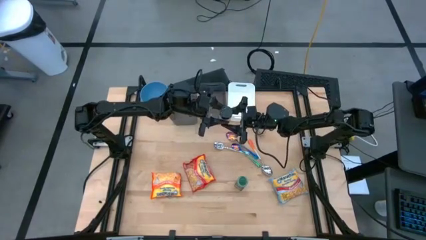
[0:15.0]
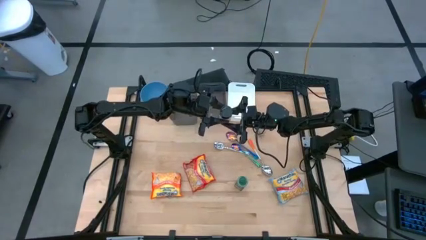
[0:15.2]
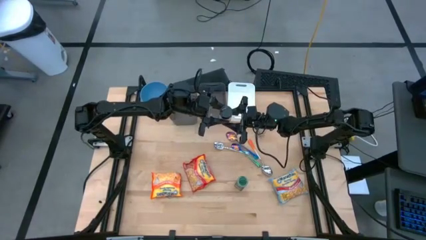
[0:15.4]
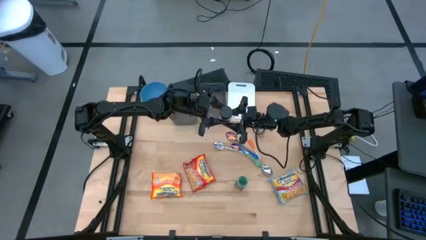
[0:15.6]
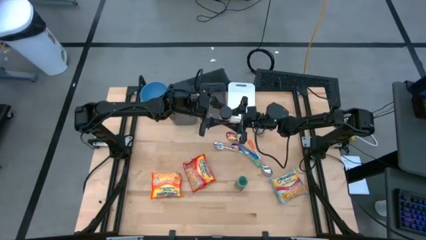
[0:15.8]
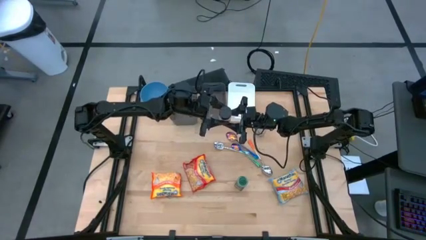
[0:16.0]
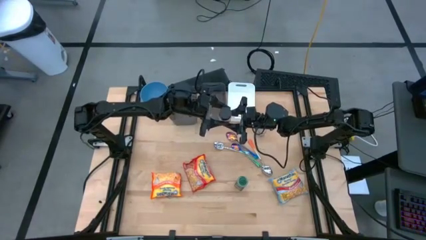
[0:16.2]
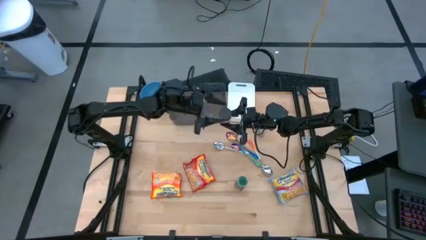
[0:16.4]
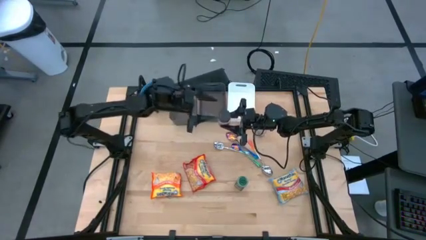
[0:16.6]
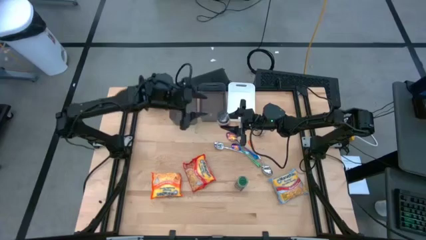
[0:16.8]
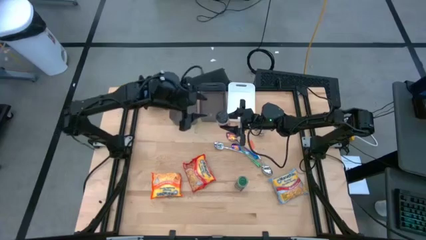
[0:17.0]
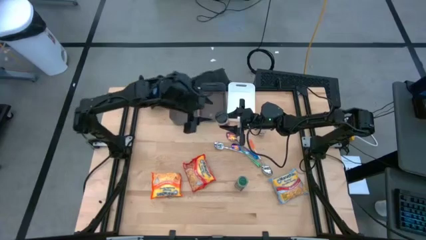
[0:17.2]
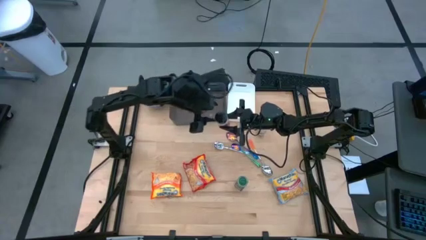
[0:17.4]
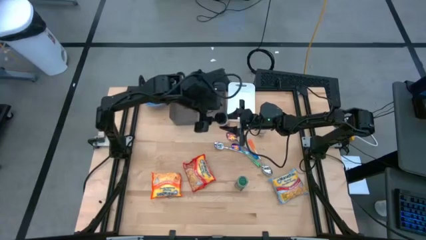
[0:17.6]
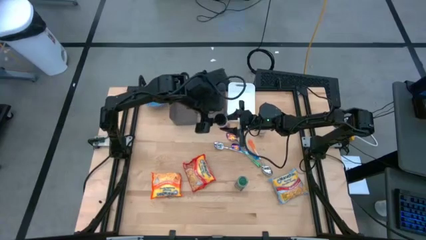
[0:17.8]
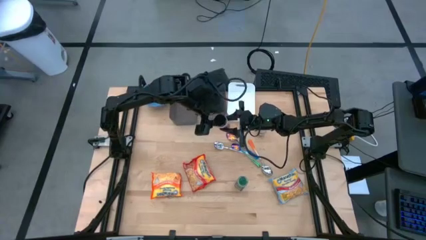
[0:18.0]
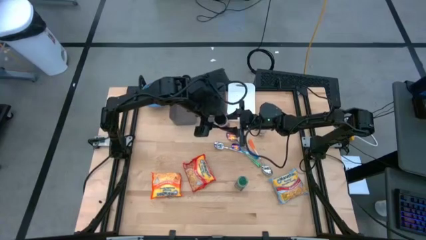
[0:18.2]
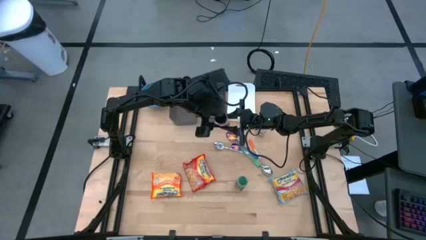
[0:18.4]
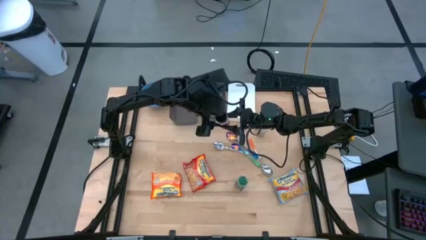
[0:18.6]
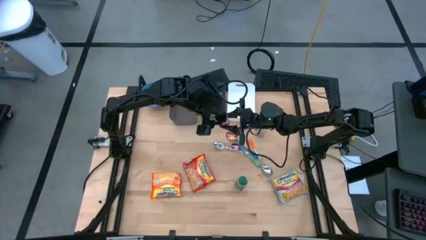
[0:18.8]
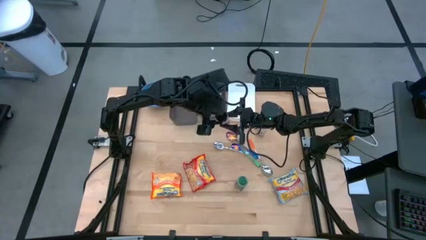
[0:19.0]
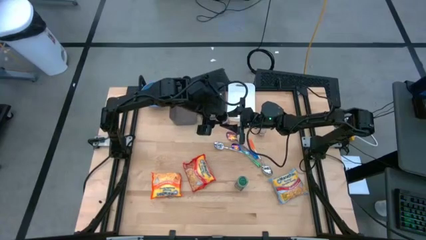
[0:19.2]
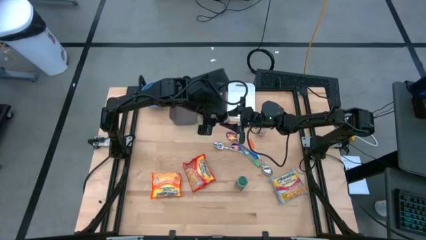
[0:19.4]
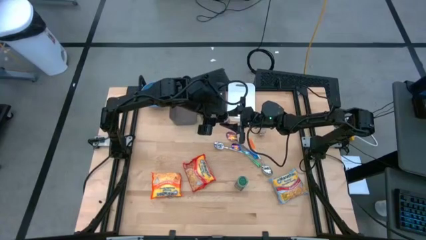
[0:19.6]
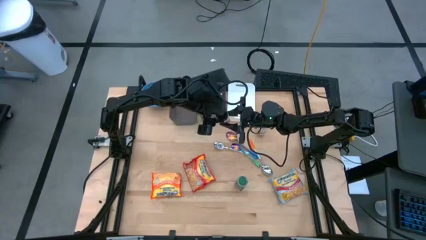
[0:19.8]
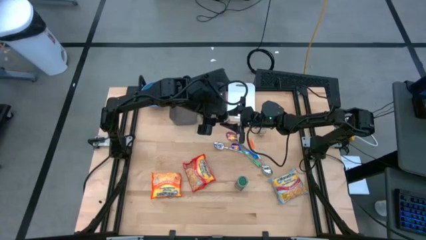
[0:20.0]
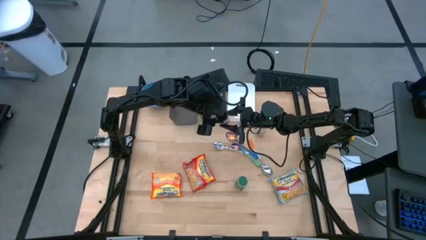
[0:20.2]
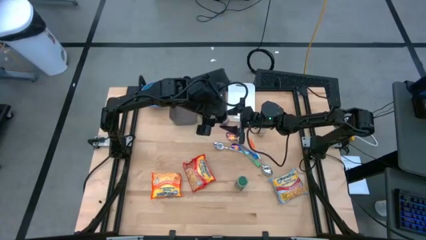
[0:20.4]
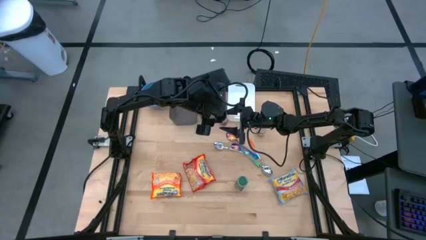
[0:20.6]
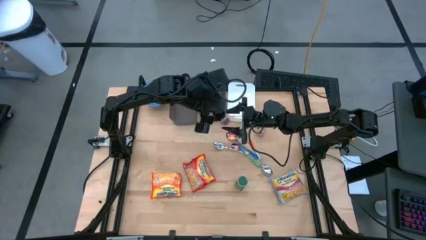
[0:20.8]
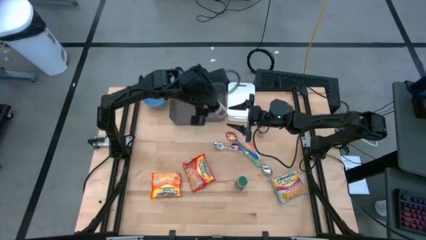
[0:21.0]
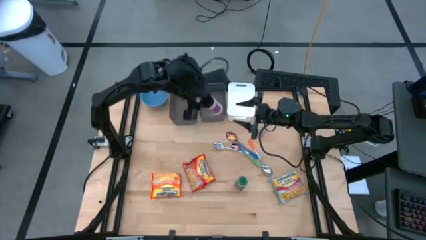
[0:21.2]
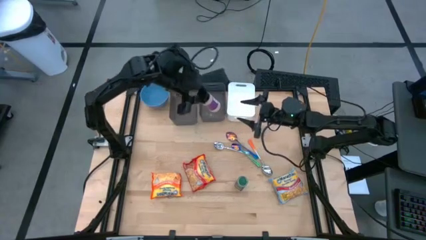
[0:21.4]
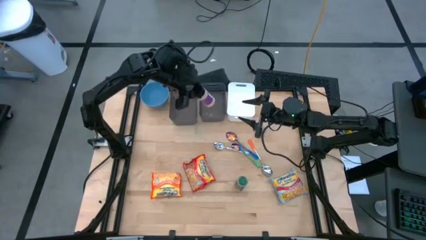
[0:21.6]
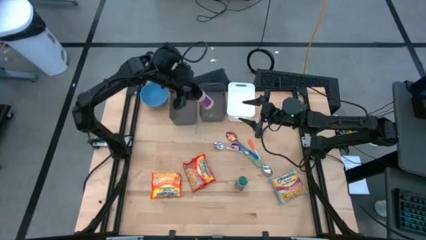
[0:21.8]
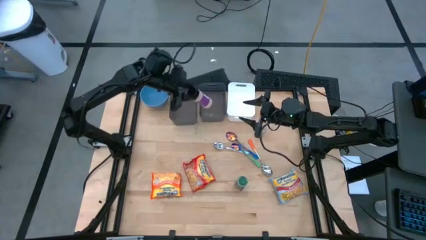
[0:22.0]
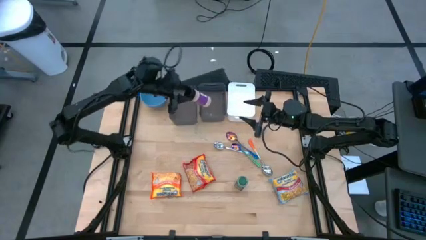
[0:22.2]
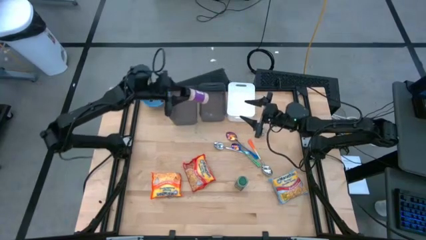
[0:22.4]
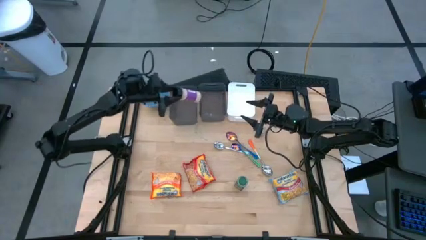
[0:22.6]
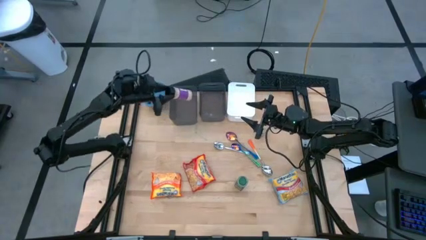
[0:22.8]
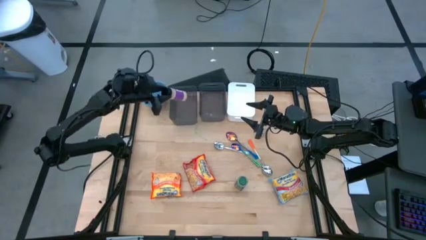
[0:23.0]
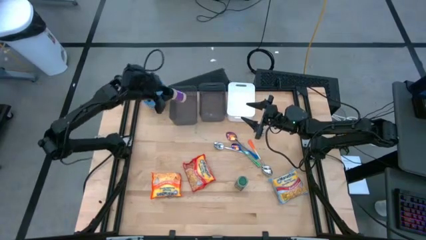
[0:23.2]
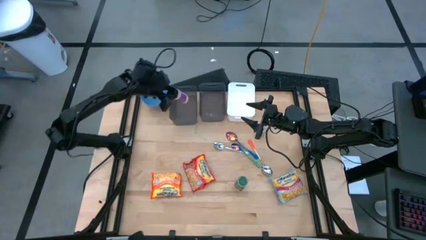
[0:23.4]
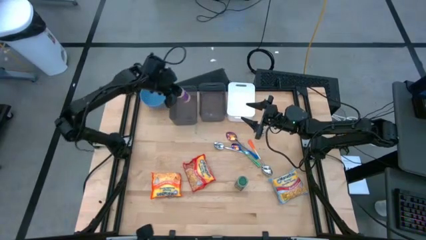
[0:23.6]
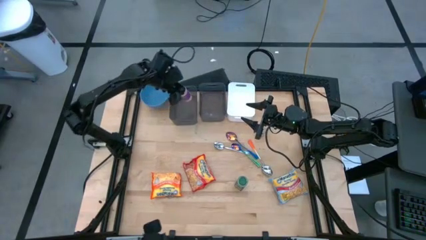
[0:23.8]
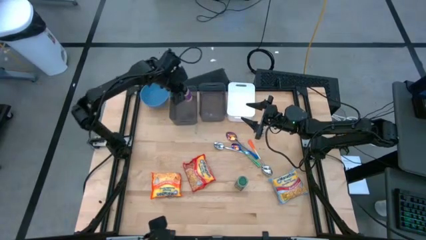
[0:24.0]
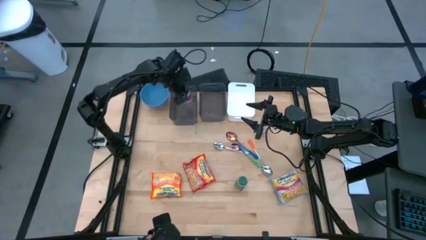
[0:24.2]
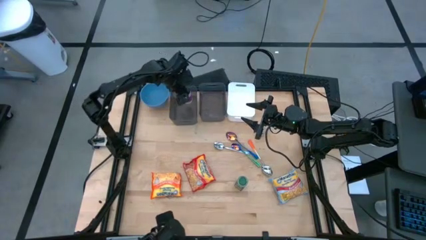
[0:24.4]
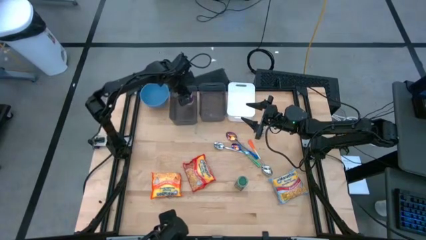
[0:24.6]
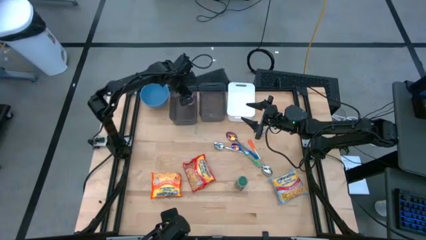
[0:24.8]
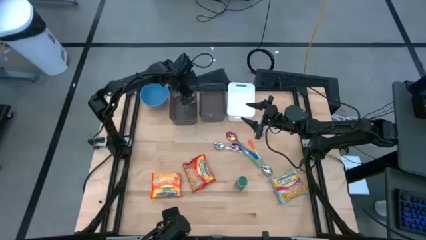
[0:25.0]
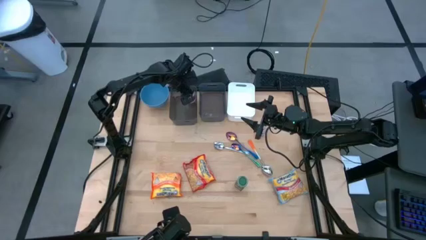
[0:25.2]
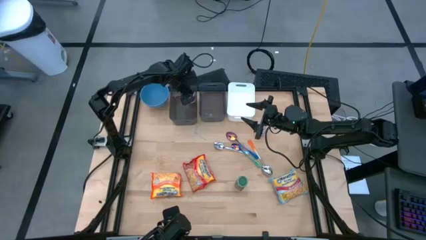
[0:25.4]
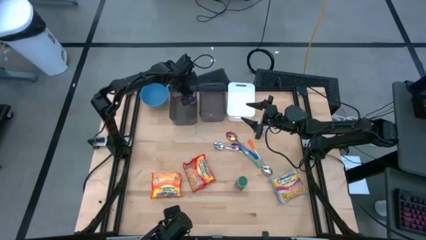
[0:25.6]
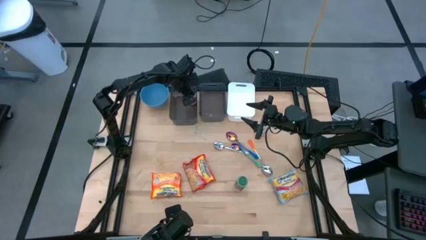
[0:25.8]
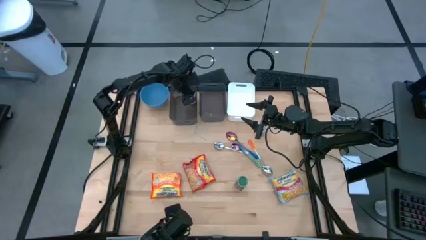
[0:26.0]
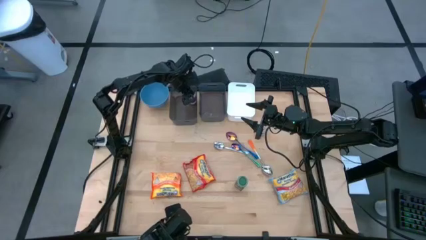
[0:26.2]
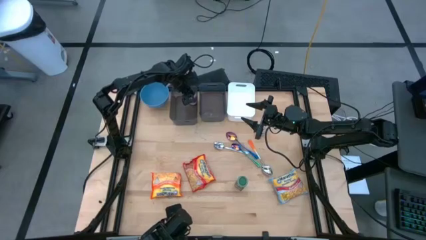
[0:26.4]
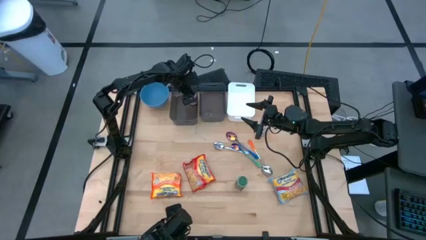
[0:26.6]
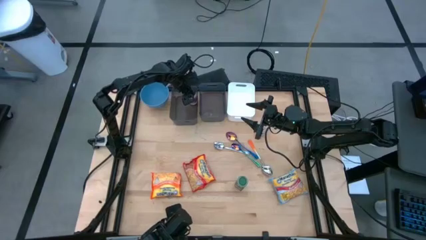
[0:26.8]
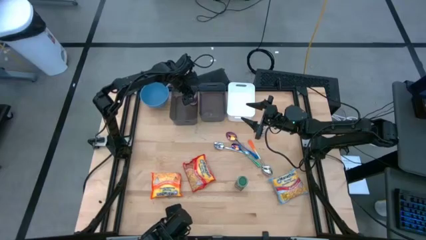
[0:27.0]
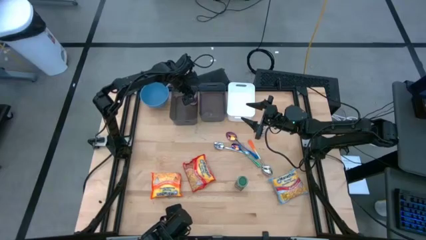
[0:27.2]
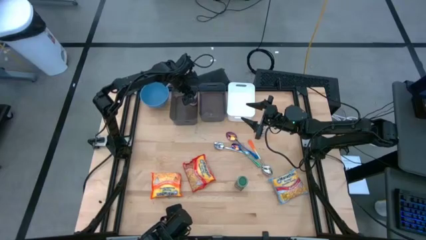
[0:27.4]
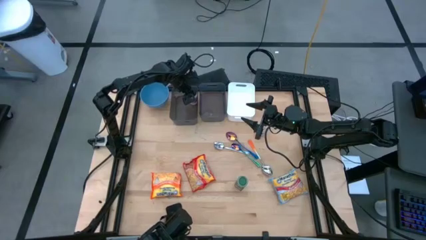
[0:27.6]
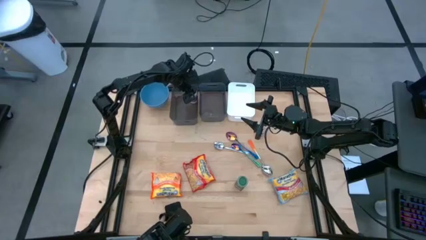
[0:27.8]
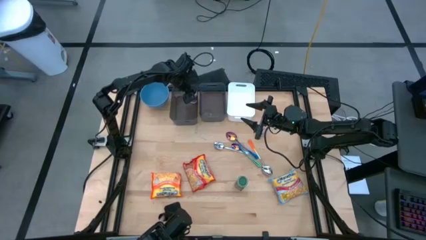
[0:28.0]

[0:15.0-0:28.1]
Task: Pick & Place Food Item
Put the purple spice bottle into the left black bin
